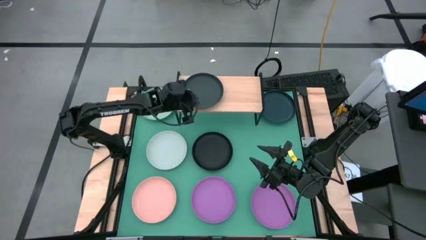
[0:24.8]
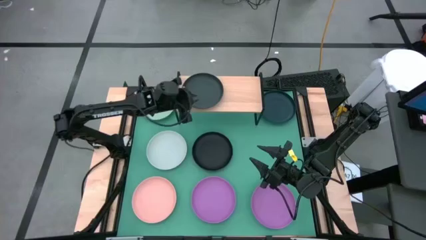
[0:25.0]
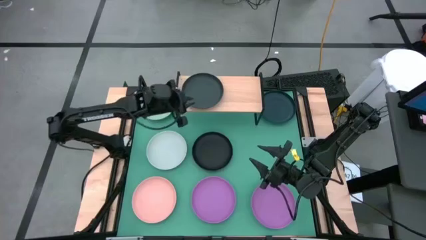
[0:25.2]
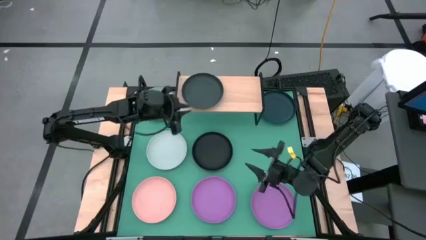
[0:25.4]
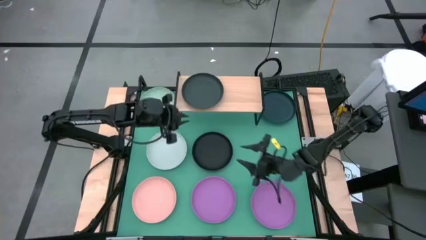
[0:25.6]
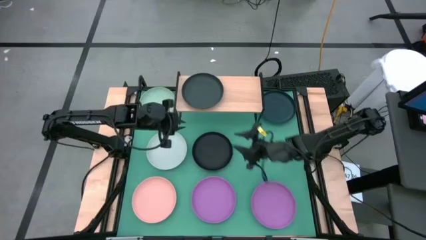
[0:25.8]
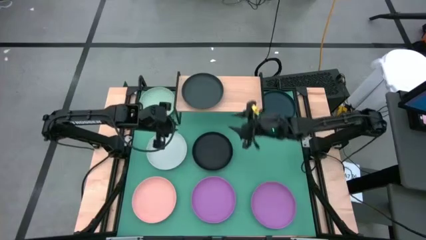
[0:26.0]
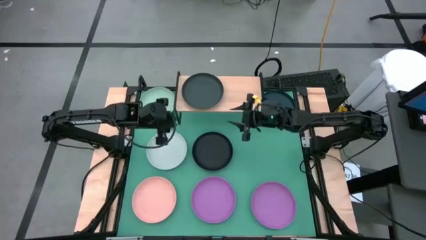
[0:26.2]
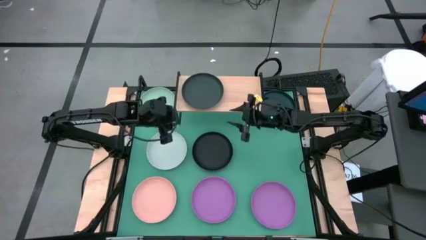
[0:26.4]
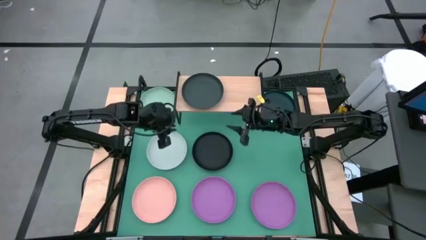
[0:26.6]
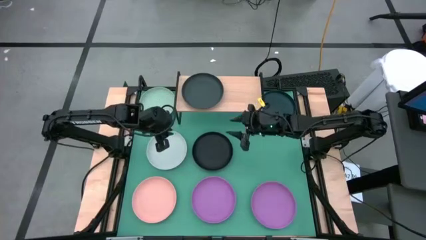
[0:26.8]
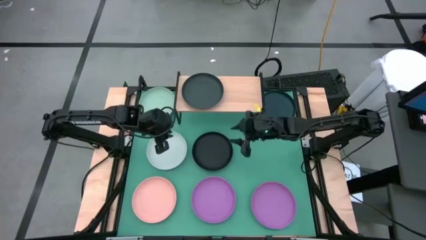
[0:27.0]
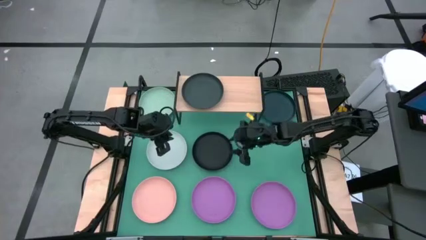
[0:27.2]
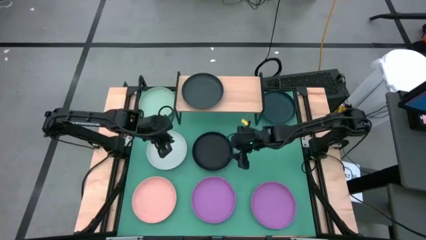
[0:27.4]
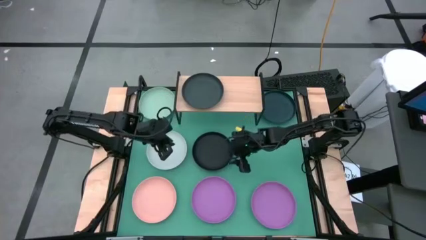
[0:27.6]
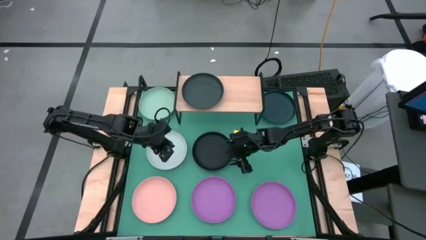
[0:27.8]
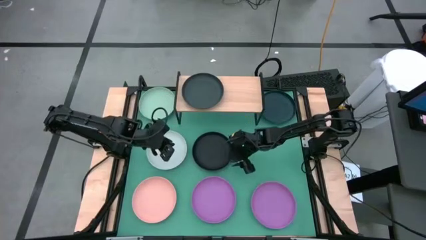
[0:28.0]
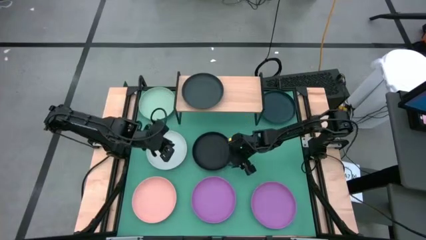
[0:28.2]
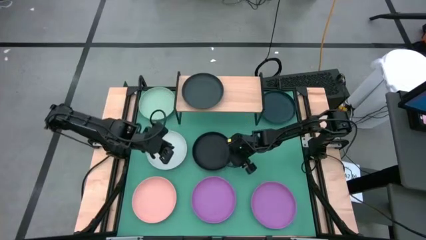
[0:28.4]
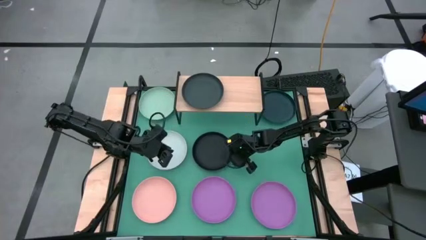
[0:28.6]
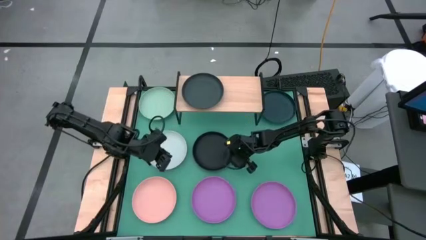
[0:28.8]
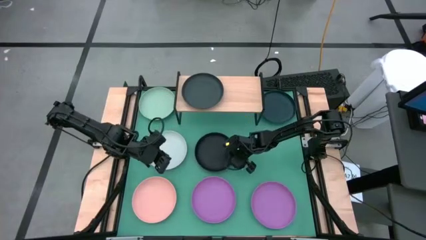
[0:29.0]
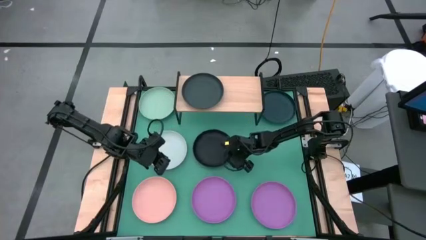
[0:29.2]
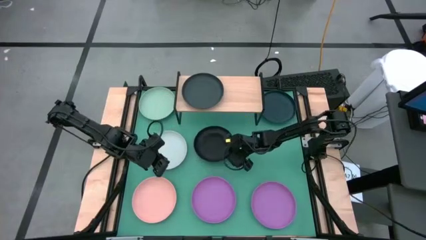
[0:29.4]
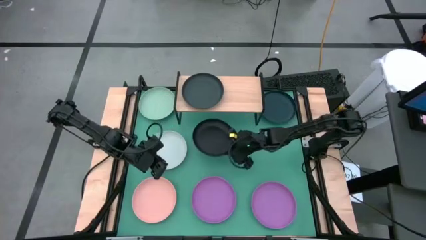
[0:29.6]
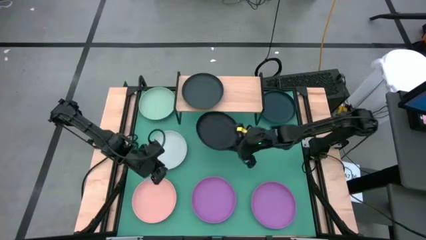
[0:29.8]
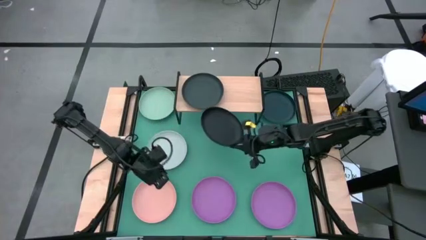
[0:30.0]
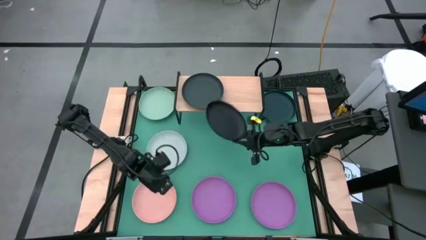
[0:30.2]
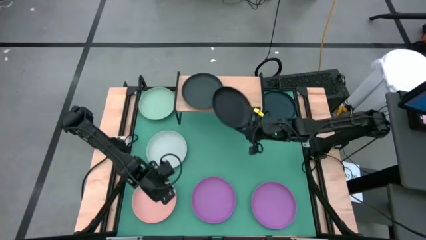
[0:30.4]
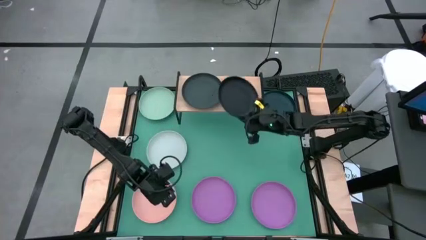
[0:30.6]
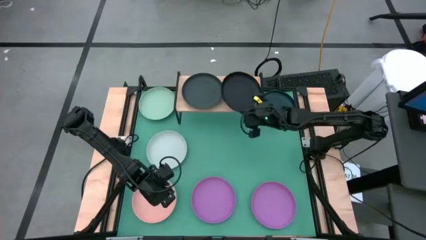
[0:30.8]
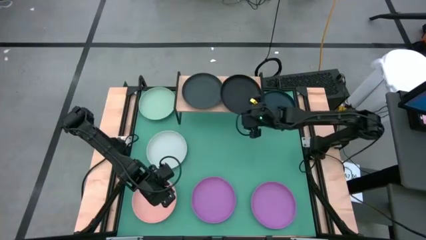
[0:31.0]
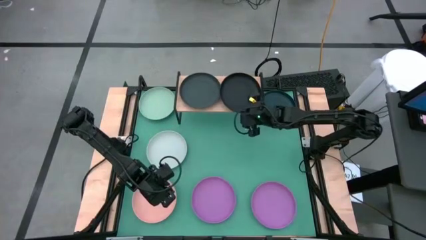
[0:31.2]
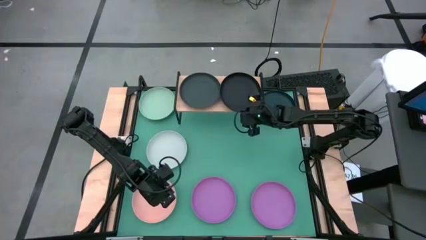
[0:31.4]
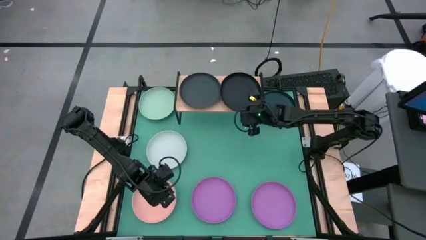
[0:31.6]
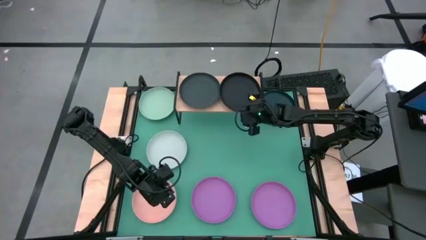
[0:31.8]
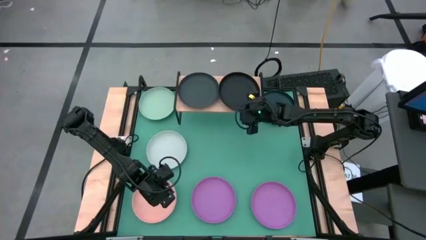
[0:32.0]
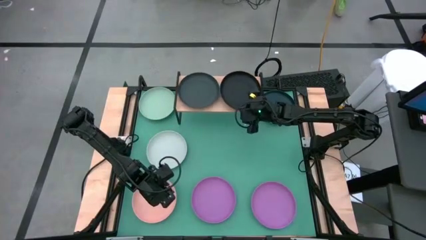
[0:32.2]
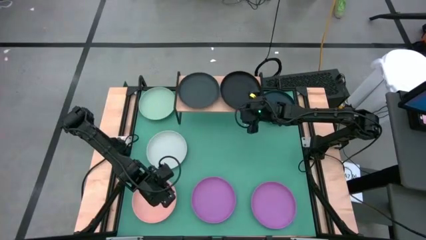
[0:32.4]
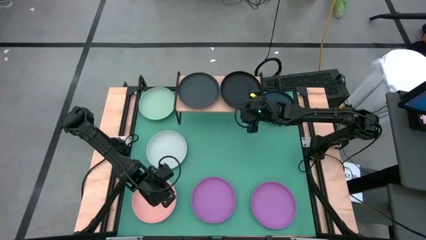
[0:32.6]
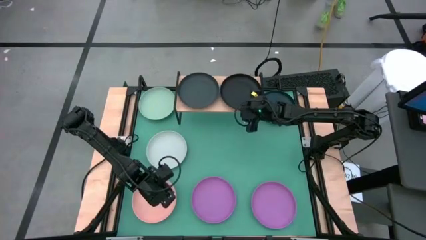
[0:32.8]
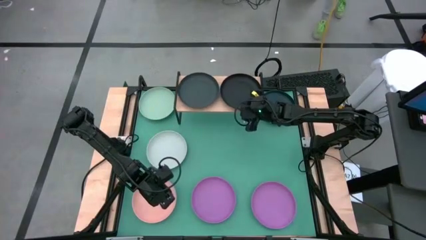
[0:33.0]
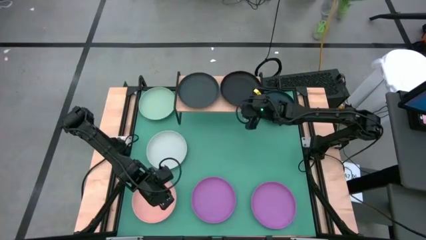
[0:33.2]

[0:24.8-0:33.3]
Task: Place and stack plates onto a shelf
Put the black plate on the shelf

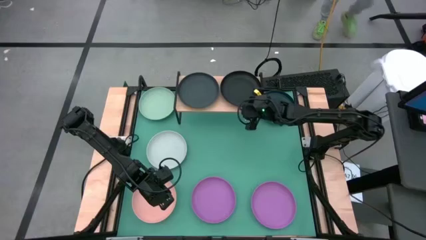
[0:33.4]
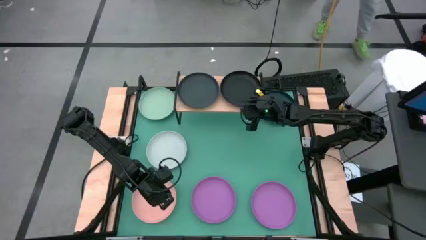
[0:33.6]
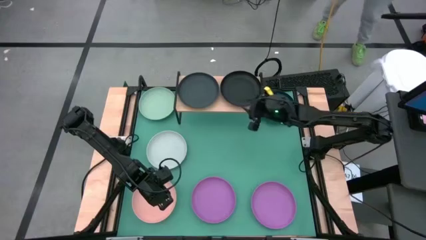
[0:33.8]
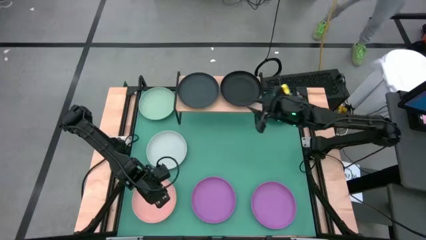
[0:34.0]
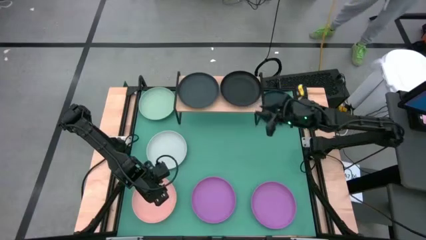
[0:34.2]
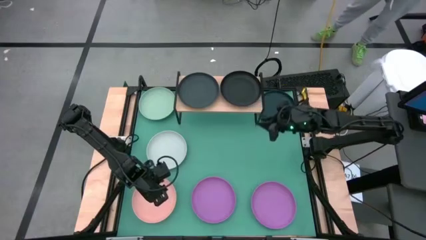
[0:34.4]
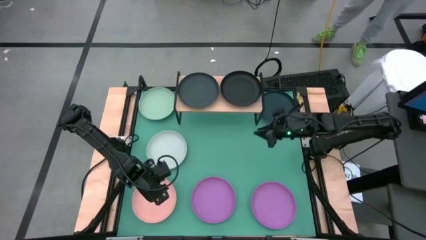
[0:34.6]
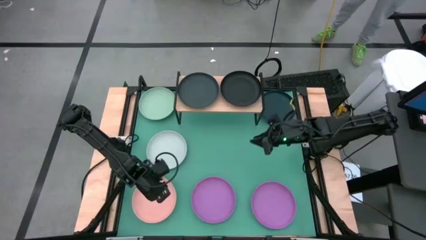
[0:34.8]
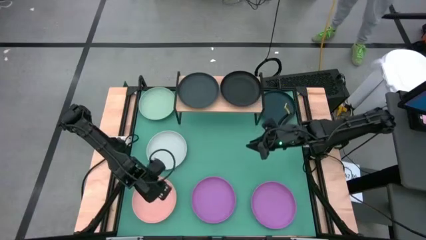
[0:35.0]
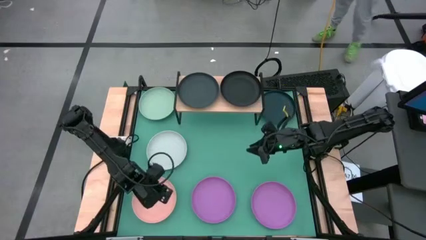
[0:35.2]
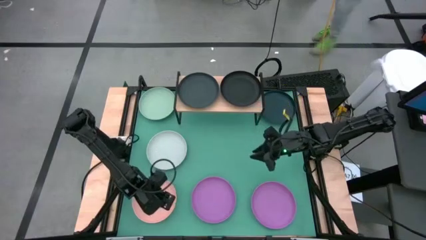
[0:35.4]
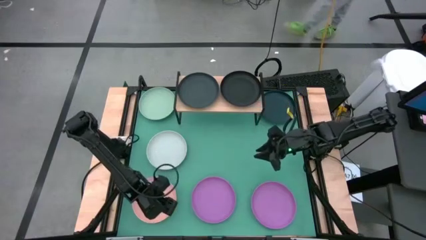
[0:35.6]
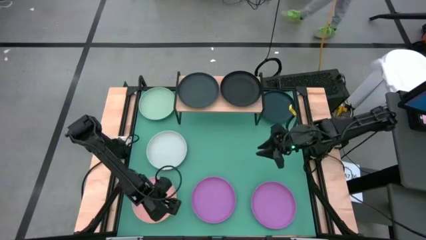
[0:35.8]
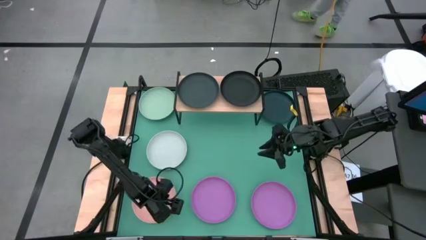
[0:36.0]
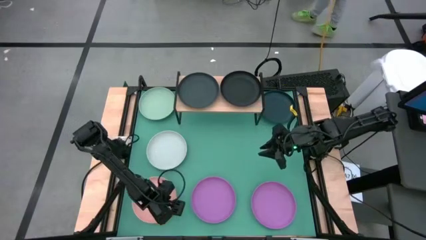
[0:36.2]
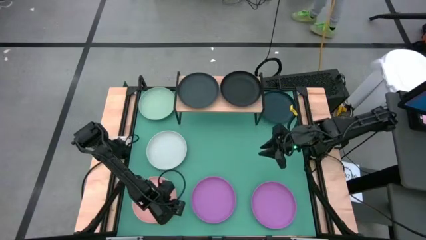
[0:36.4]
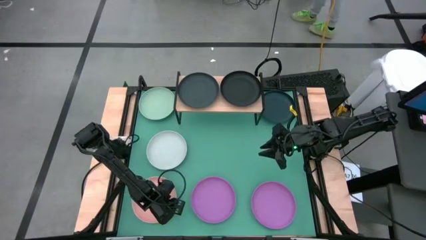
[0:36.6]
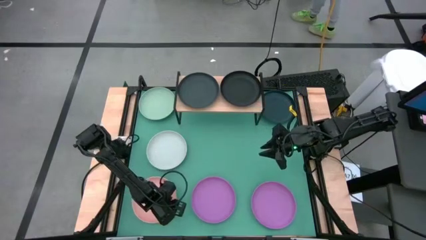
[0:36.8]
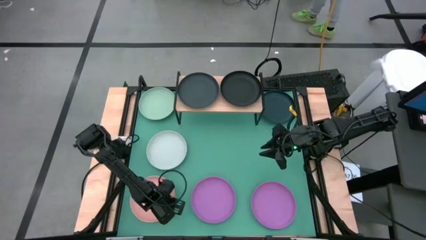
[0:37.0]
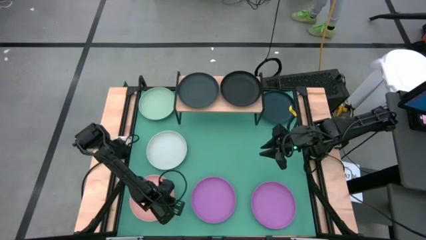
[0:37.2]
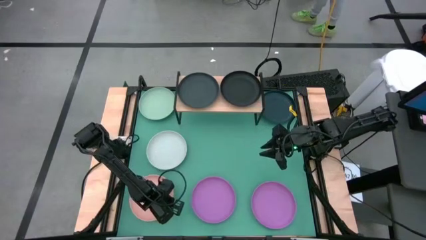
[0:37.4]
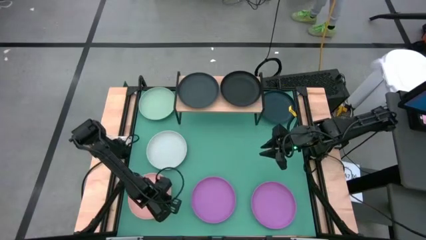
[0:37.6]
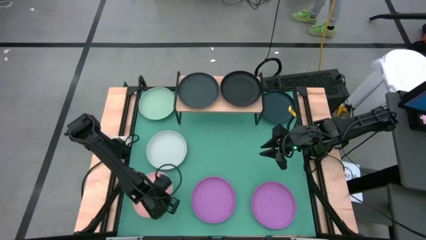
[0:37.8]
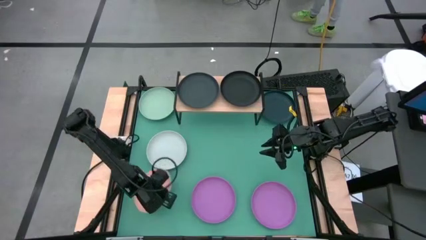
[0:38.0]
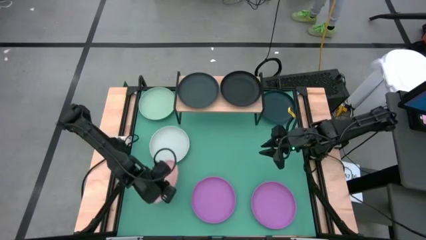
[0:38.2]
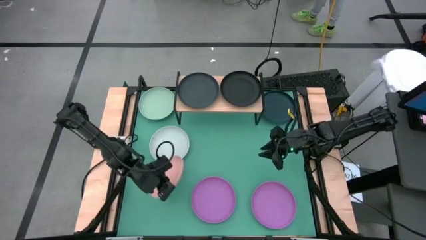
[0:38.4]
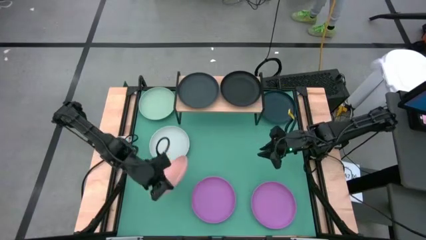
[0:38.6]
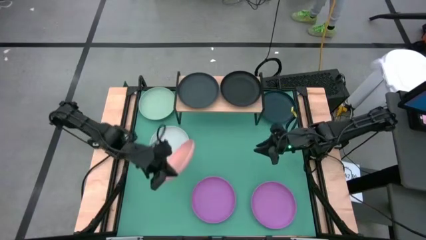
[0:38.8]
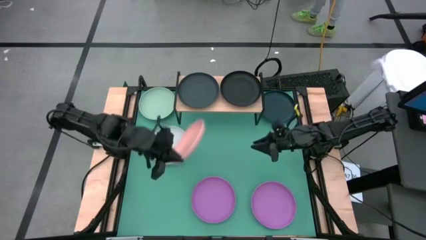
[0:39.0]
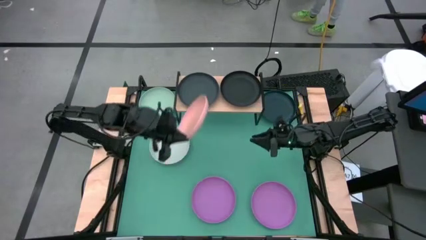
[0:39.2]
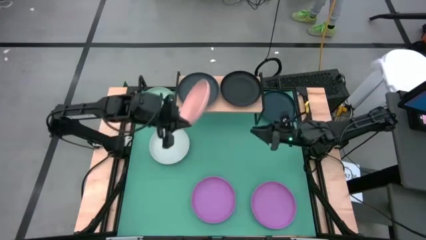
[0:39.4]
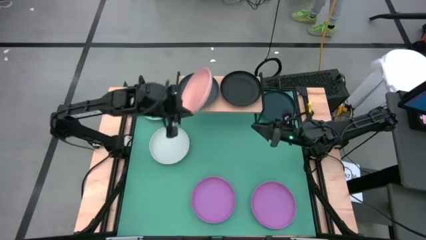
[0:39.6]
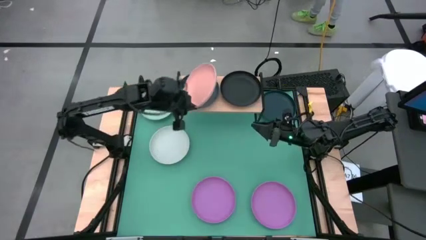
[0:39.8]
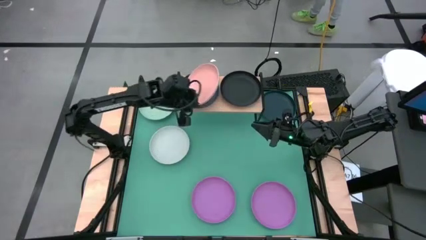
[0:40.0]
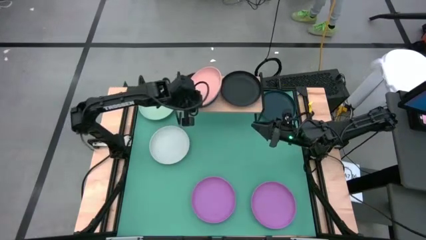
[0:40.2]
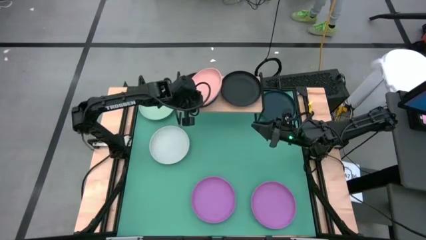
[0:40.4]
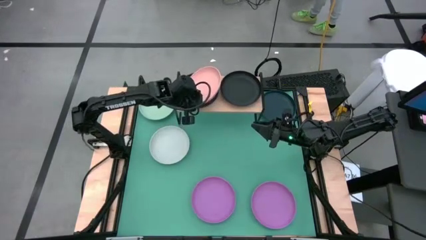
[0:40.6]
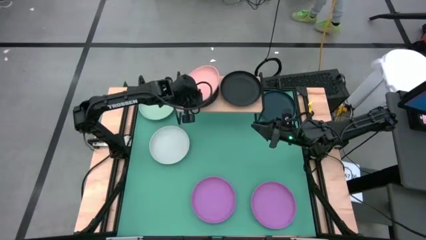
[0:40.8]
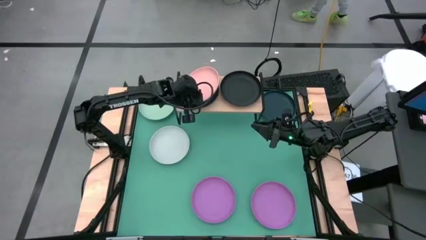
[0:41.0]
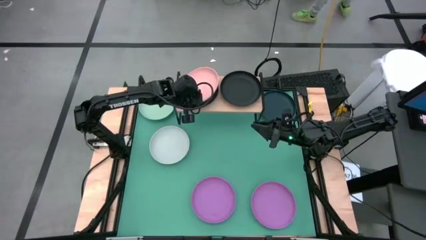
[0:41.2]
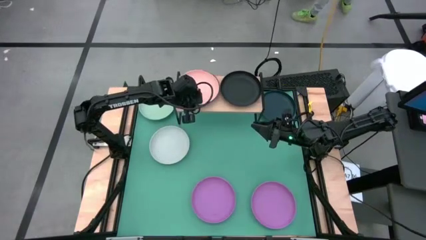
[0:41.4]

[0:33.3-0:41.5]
Stack the light orange plate on top of the dark blue plate on the shelf
